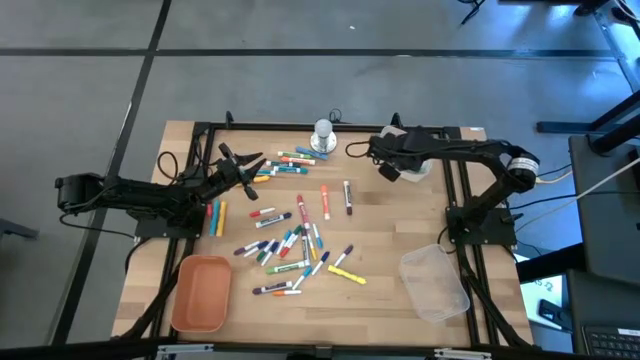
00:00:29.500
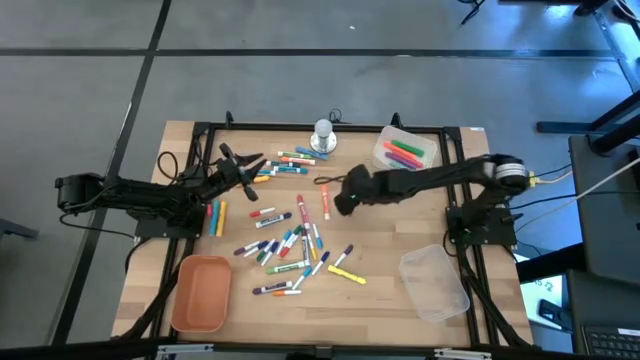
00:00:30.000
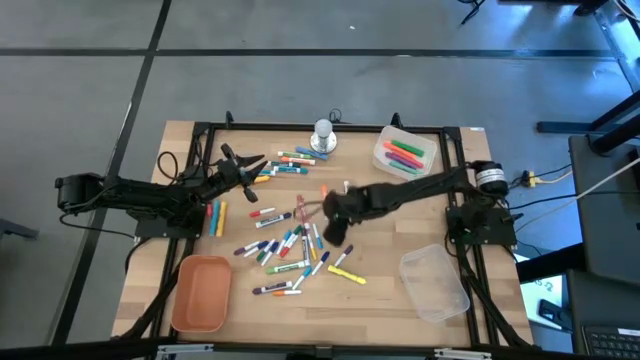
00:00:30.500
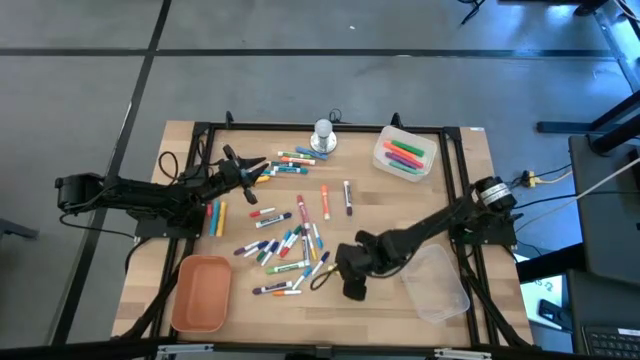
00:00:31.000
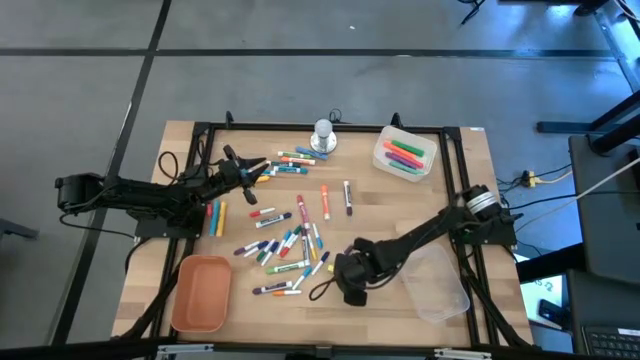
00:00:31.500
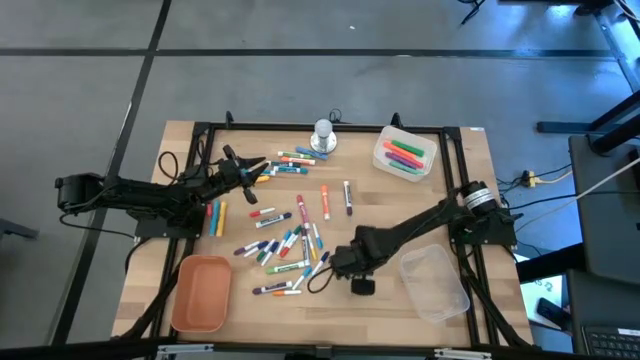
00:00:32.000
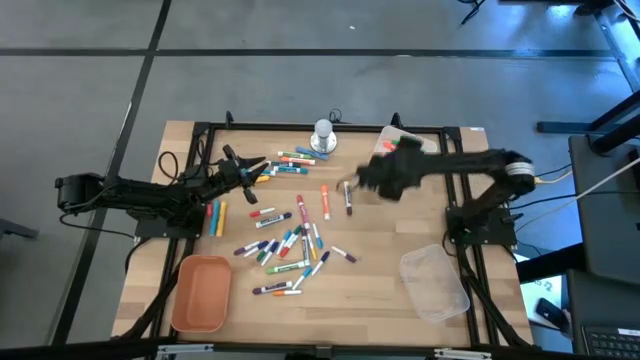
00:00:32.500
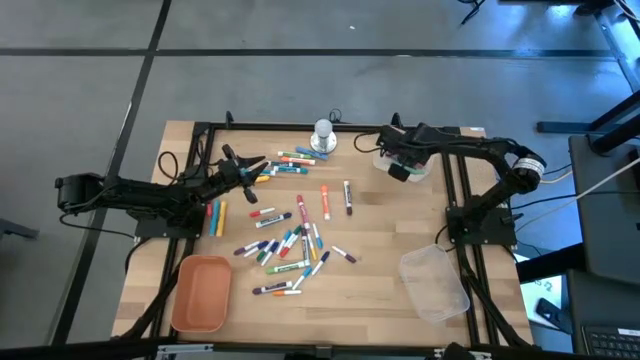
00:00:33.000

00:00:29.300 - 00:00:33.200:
Task: Pick & Place Markers
Put the large yellow highlighter pen into the white bin

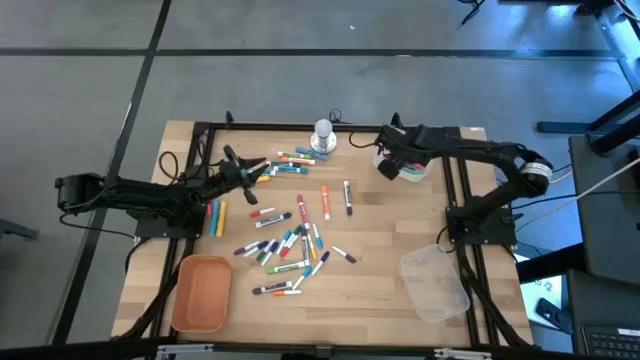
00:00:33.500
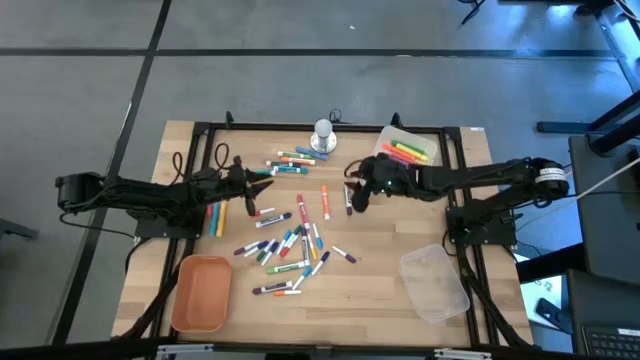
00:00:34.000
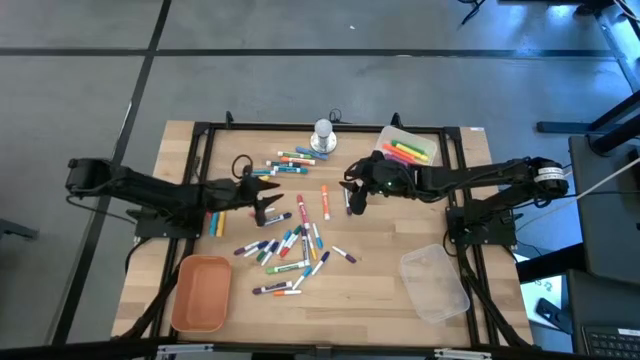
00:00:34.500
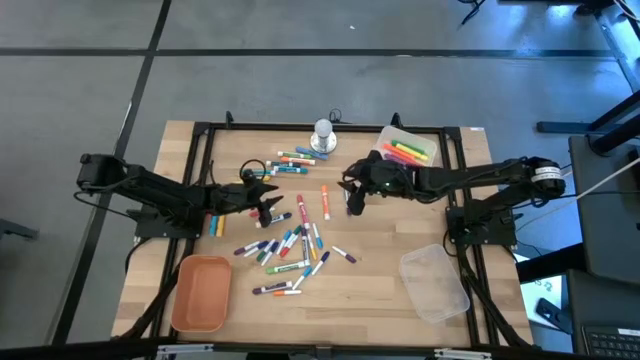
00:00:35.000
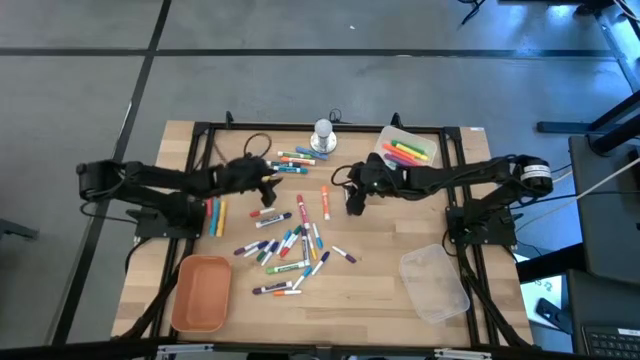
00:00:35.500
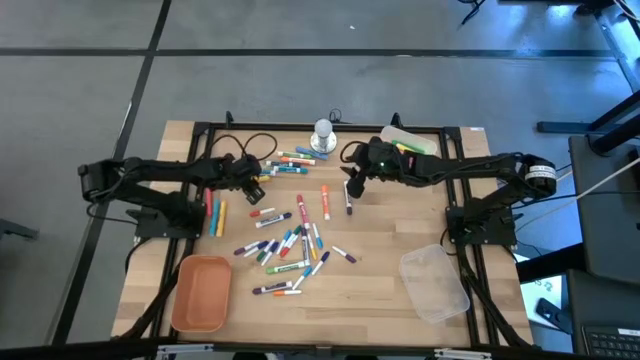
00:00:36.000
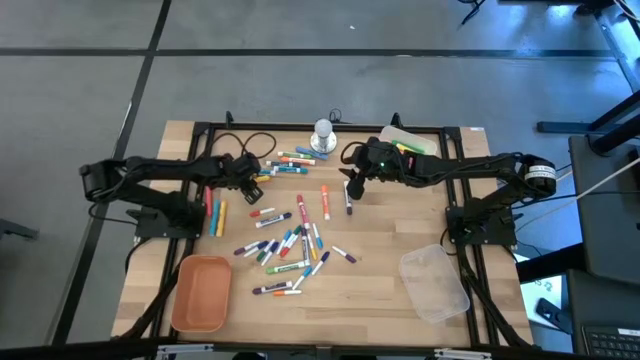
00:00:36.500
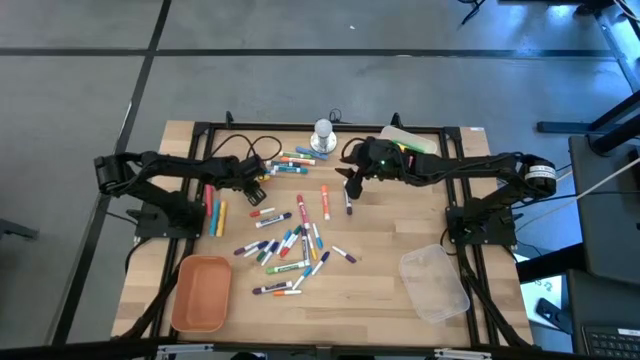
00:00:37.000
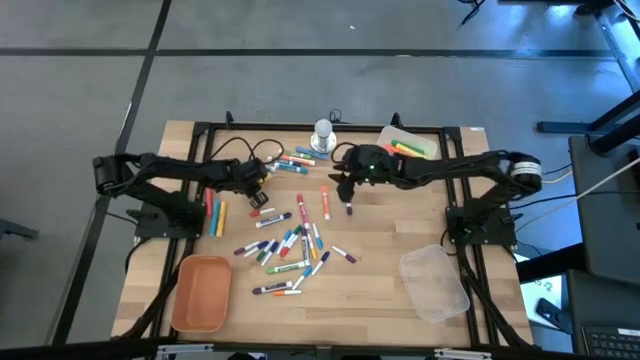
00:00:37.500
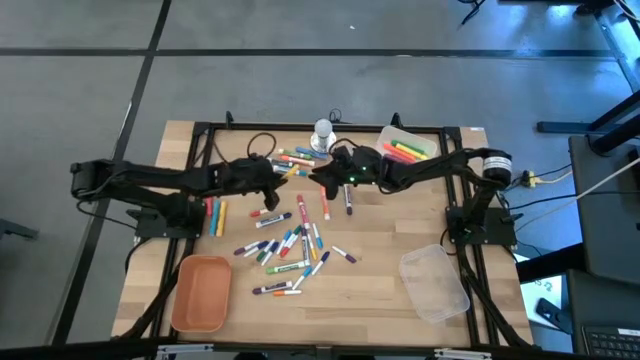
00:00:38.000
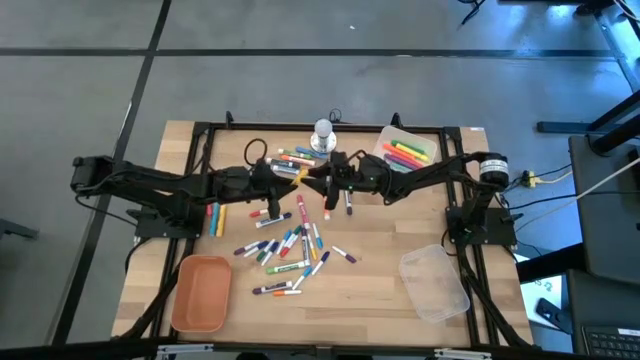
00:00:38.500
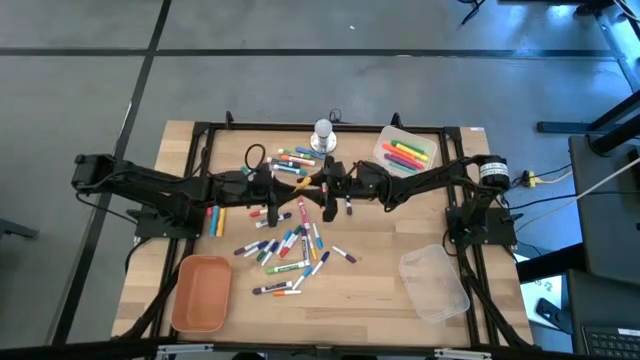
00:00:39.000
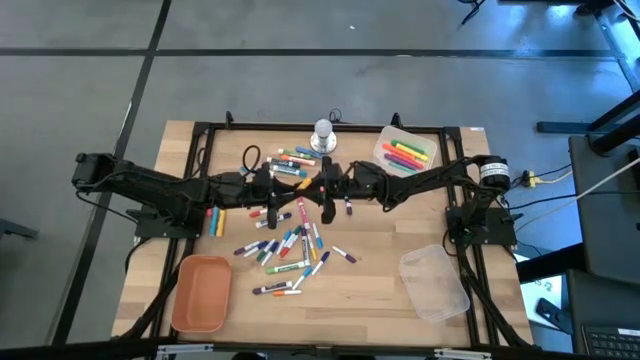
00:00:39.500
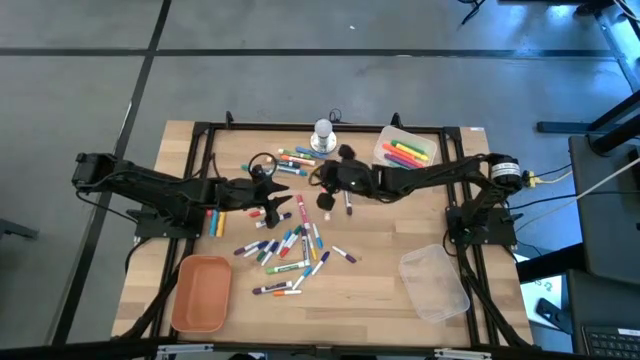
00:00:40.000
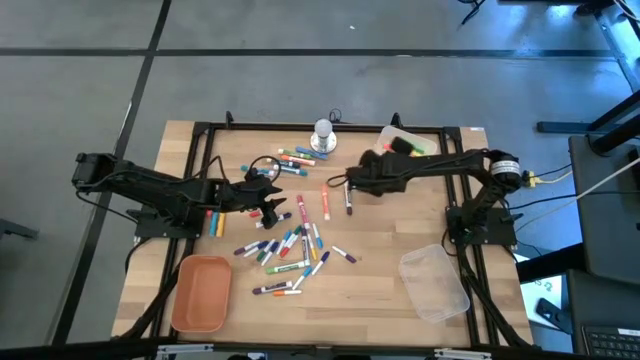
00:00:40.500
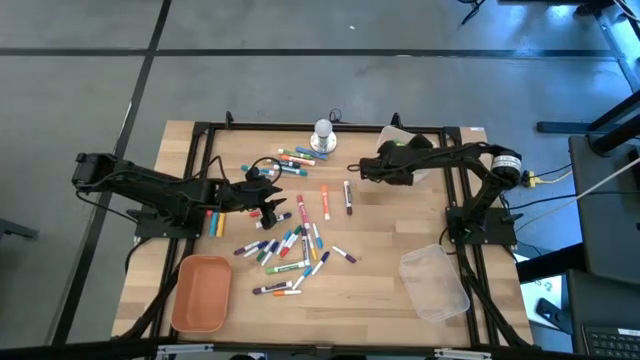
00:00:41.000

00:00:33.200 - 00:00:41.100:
Put the large yellow highlighter pen into the white bin

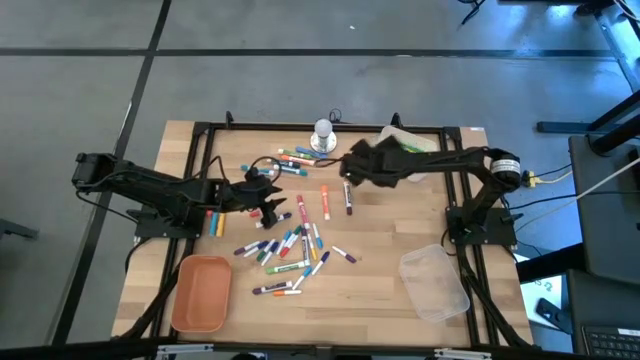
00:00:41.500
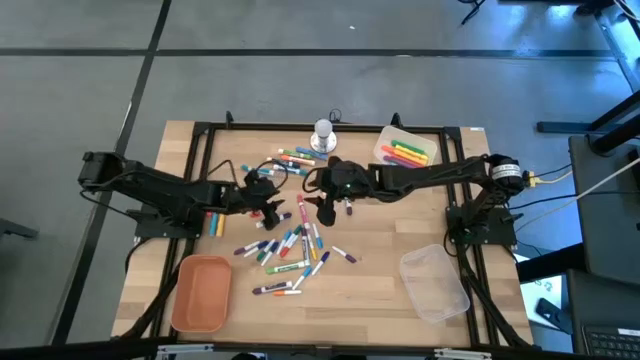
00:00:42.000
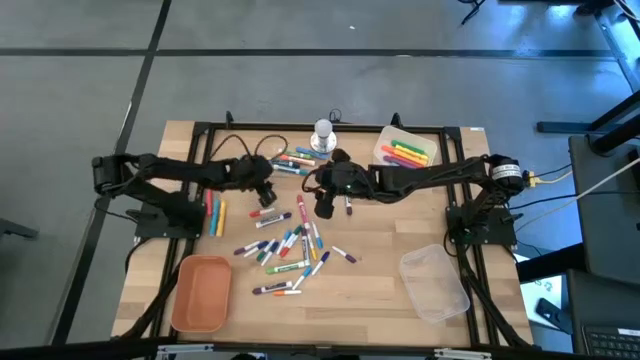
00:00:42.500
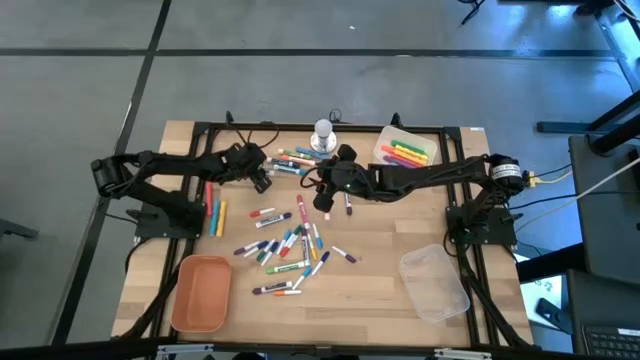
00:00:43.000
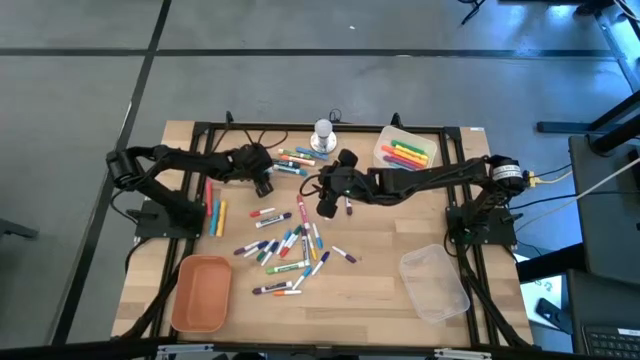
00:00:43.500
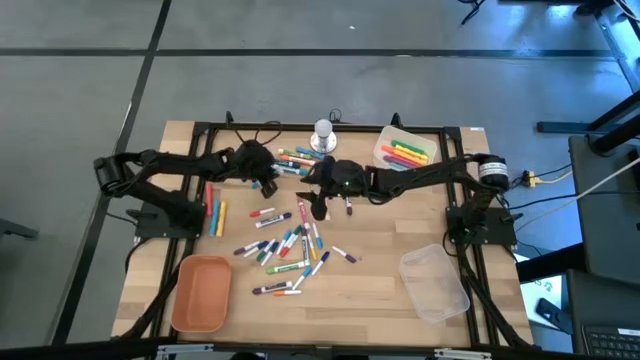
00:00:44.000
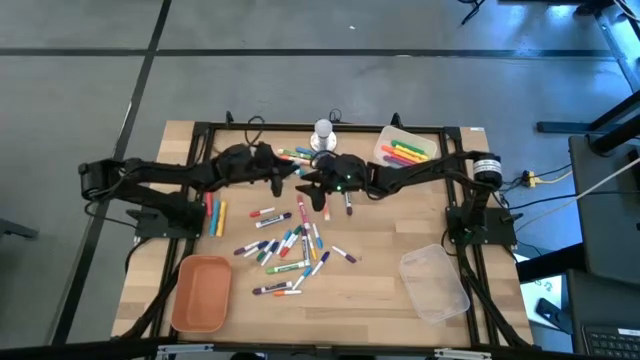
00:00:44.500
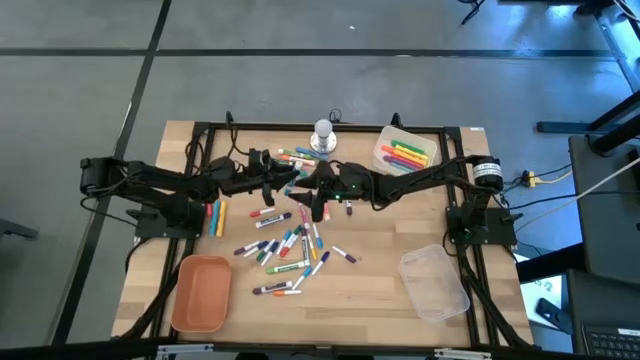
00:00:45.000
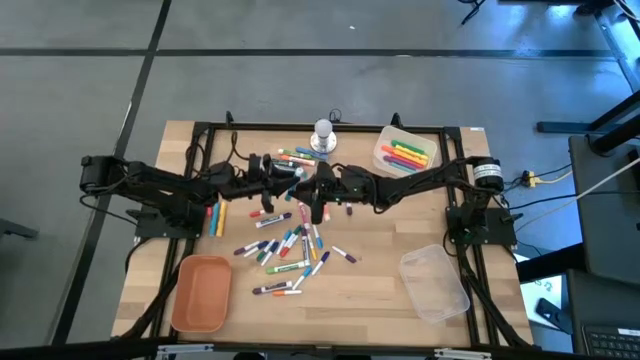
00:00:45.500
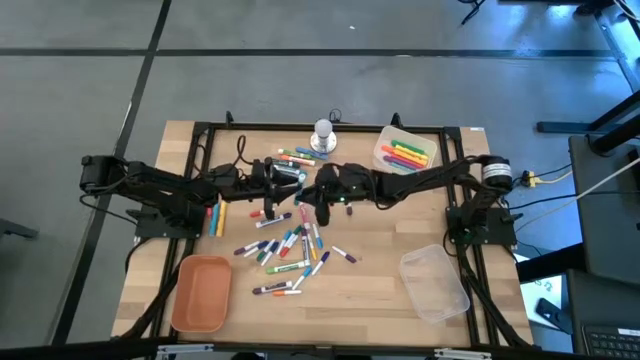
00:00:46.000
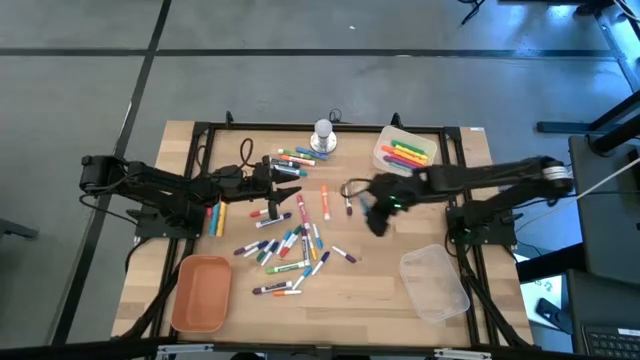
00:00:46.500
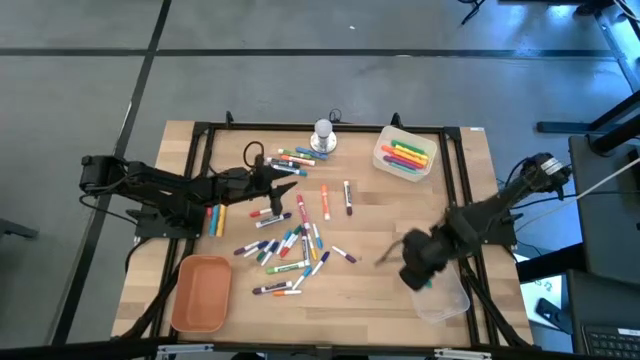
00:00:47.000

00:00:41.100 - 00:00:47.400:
Put the medium blue marker pen into the transparent bin

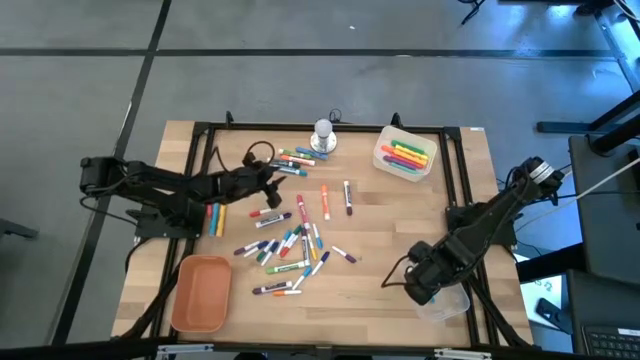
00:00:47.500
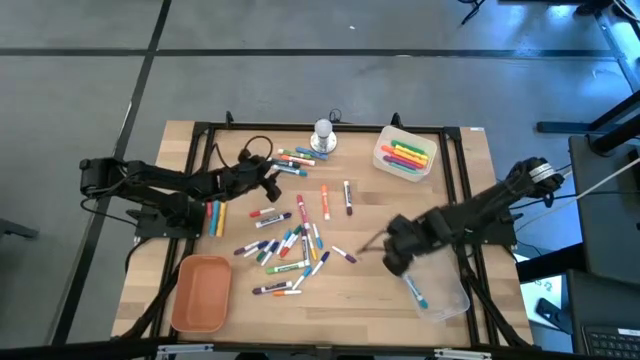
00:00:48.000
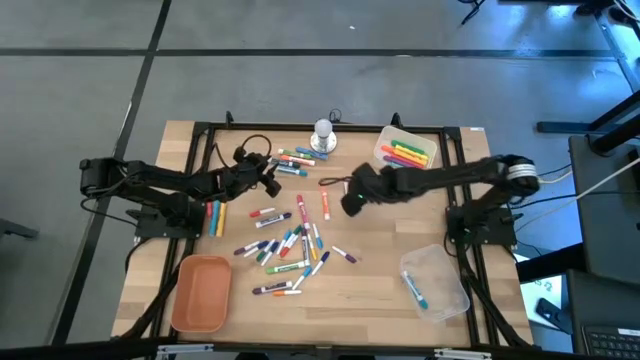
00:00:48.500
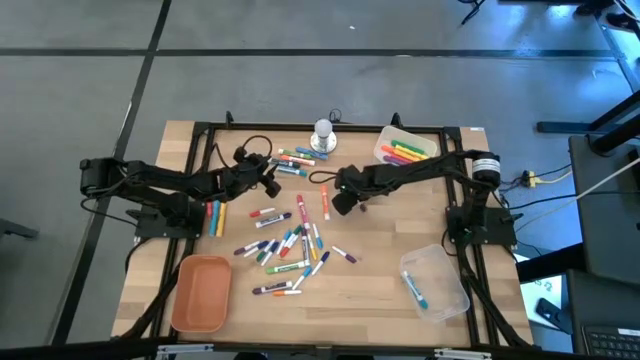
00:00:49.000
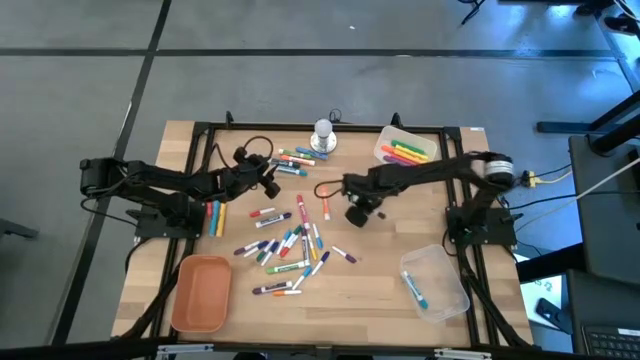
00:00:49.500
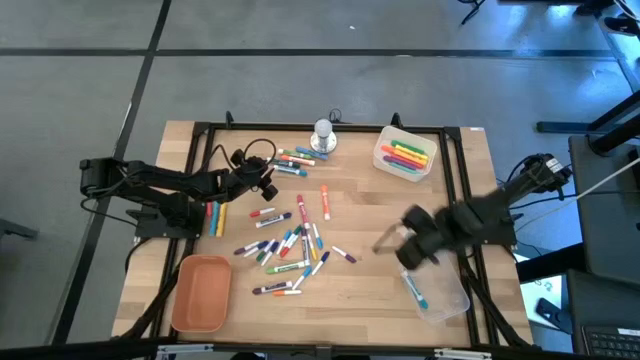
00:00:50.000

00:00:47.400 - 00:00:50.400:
Put the medium violet marker pen into the transparent bin

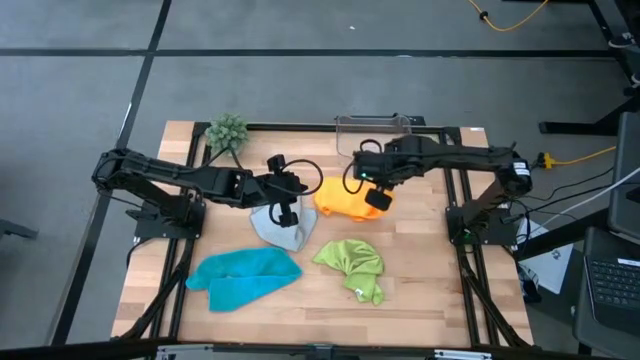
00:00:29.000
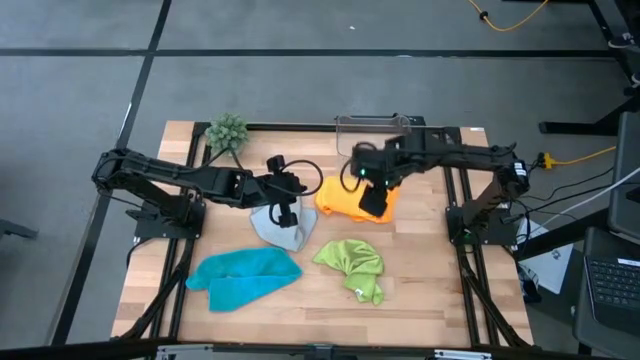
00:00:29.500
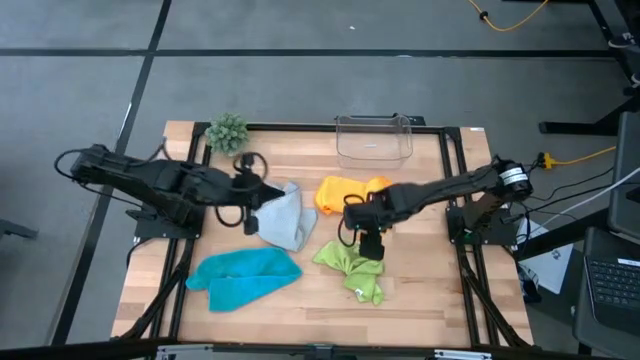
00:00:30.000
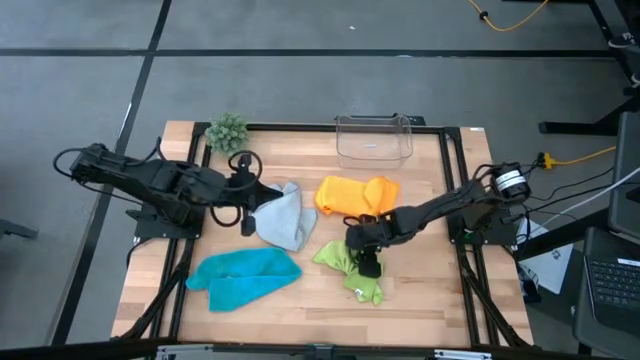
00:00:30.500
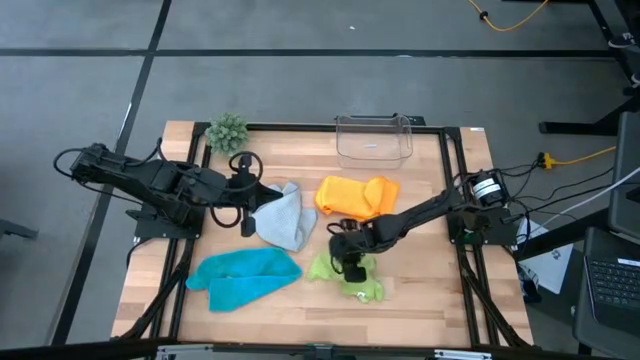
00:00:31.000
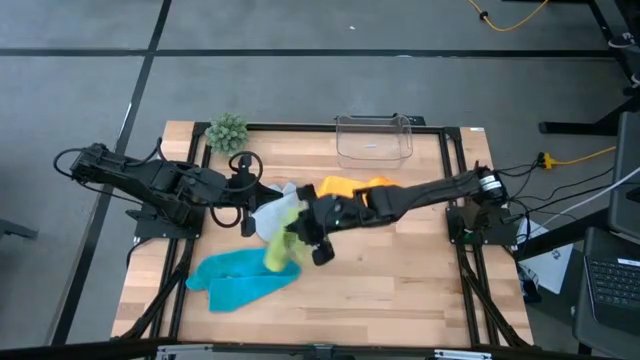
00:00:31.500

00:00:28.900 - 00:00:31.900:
Task: Fold microfiber towels
Adjust the green microfiber cloth
